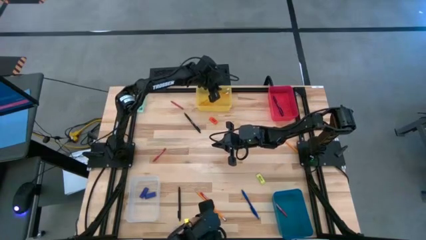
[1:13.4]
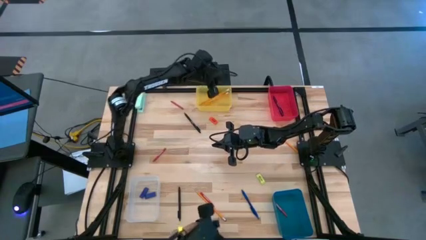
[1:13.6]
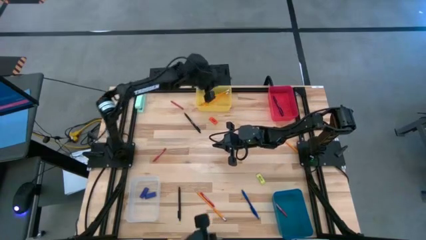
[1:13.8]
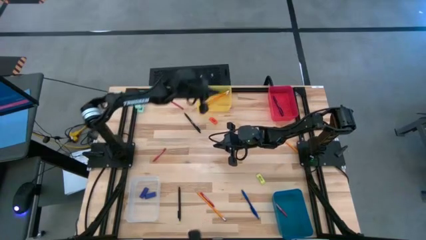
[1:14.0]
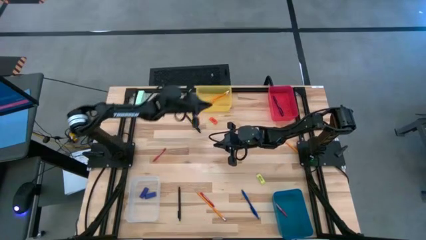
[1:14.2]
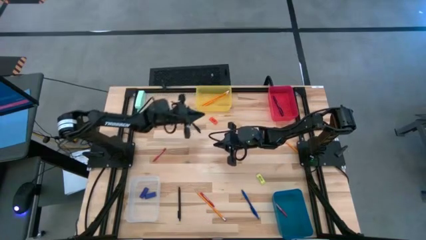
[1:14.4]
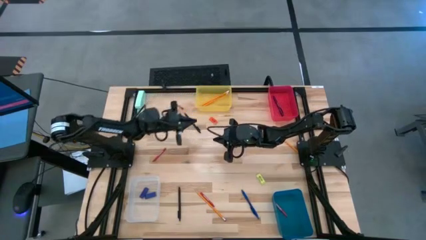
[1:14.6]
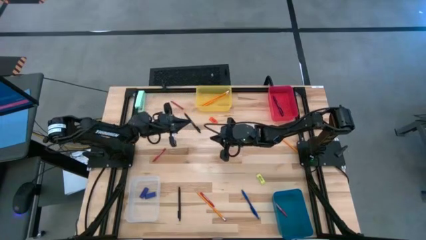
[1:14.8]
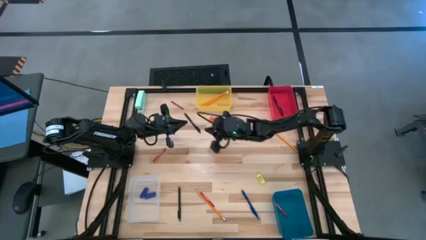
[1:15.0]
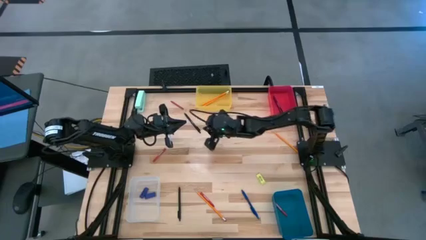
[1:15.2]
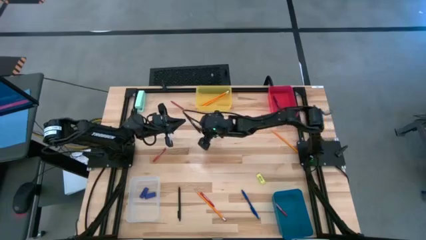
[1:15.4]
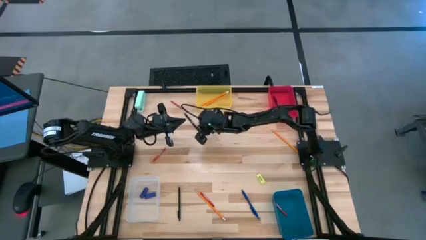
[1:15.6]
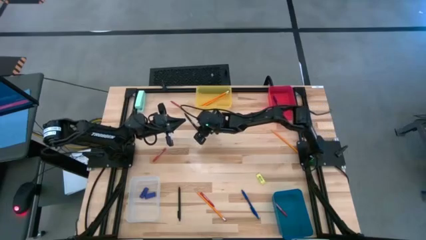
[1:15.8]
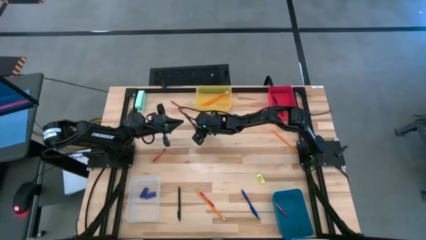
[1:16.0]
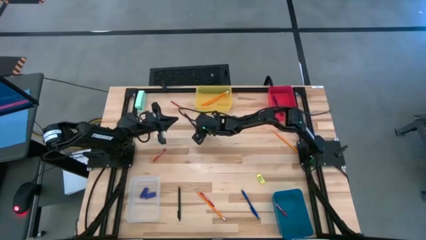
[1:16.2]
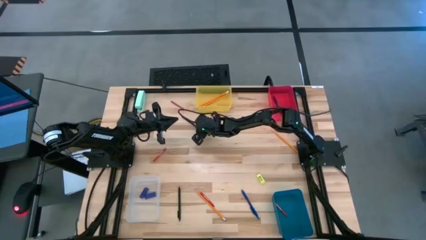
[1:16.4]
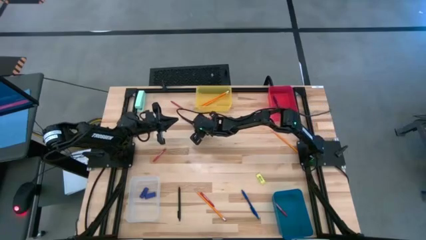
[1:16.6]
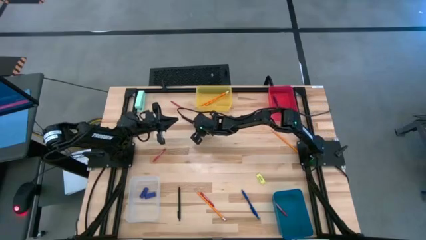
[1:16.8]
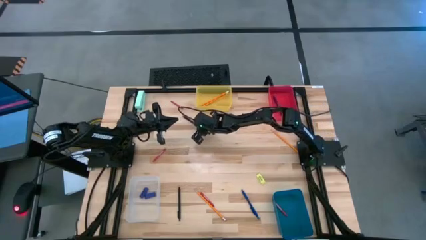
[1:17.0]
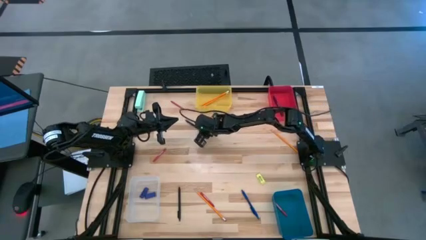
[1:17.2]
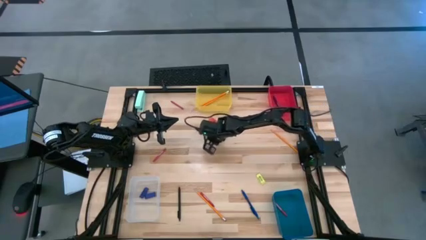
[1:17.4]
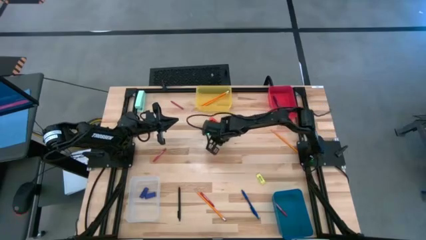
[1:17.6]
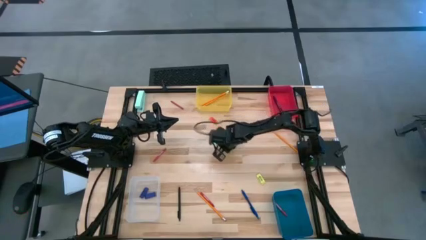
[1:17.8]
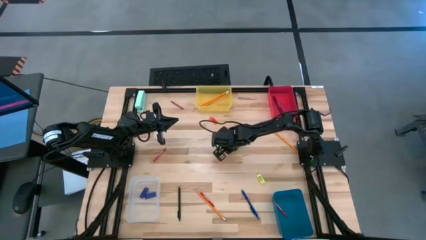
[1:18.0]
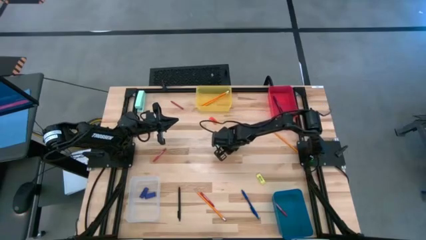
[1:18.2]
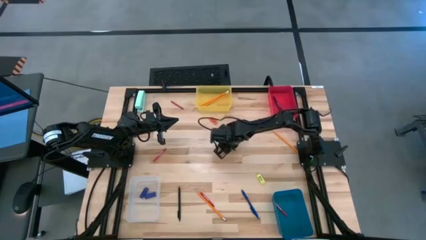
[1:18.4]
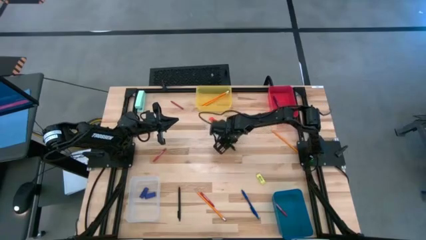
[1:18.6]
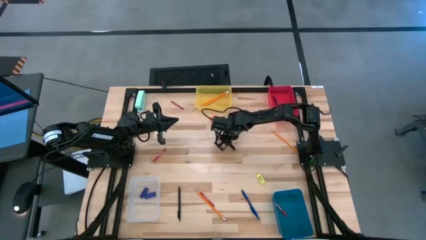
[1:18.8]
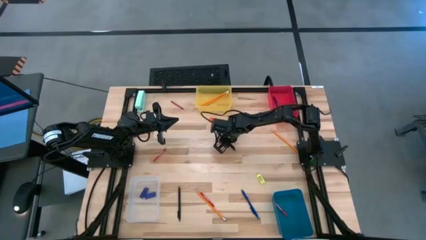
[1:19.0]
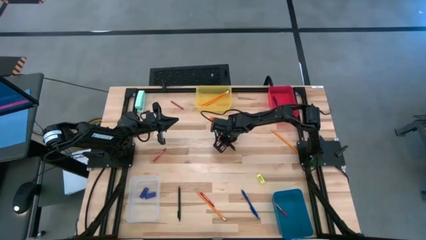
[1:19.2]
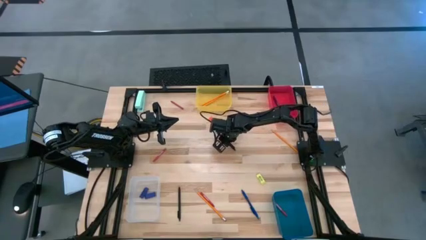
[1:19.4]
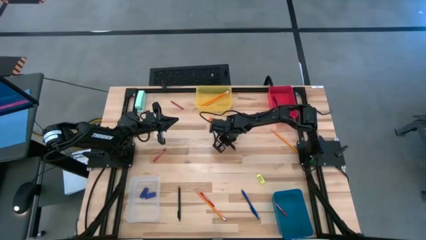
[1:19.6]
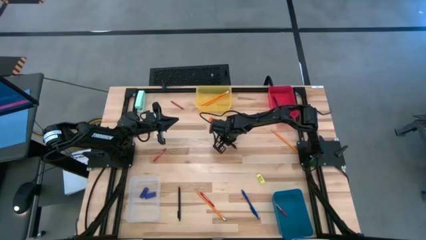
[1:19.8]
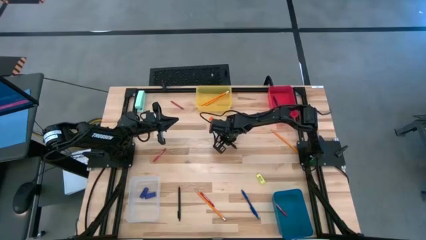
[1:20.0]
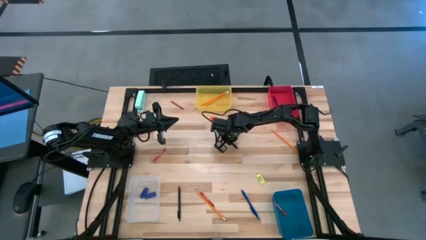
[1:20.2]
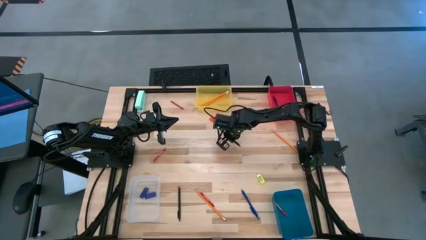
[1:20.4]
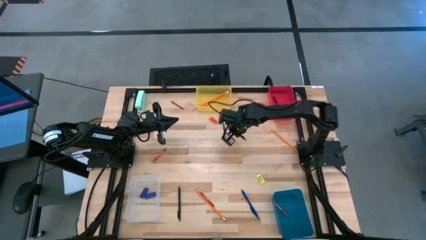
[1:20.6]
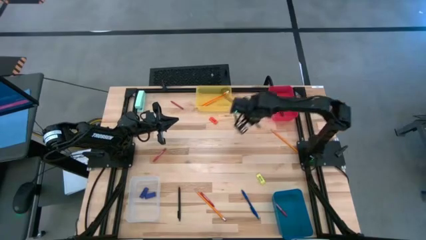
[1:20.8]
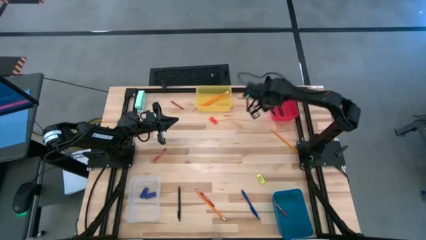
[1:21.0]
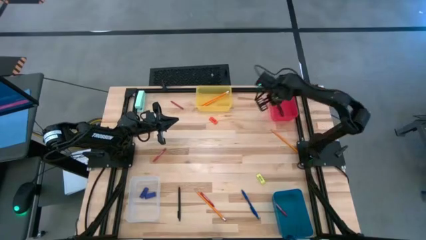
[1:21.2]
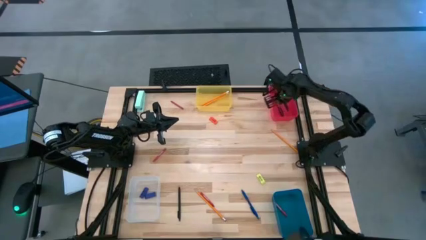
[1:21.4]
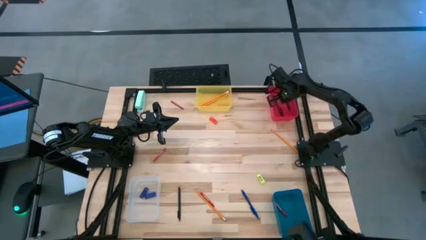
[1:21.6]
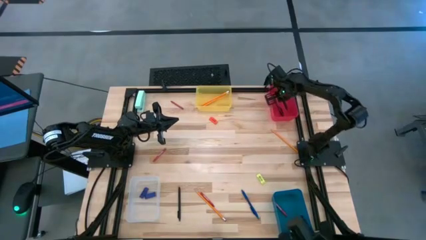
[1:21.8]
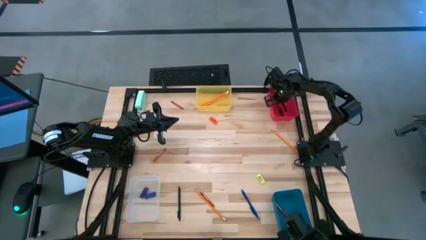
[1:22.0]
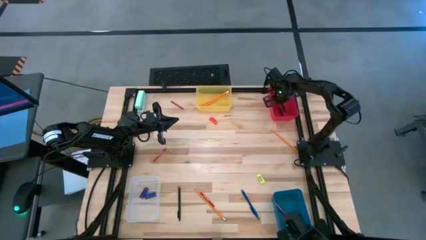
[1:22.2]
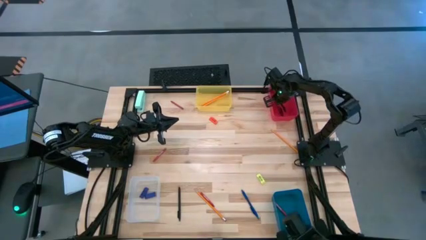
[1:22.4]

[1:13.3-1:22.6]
Task: Sort crayons/erasers/pens/pencils in bins
Put the black pen into the red bin

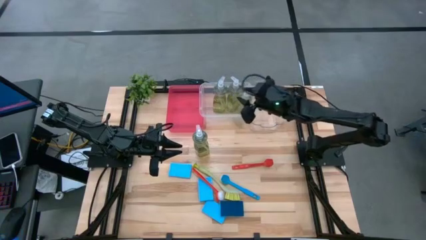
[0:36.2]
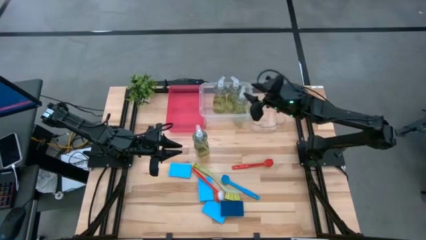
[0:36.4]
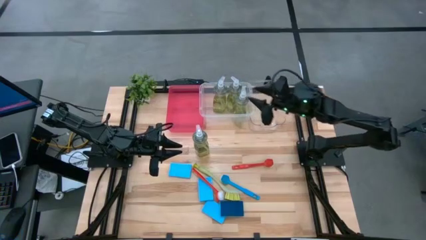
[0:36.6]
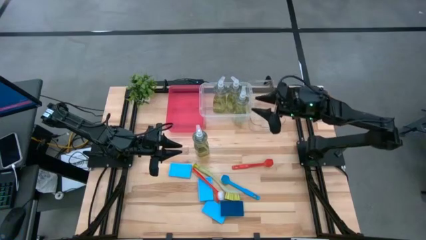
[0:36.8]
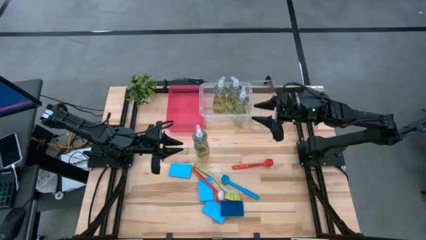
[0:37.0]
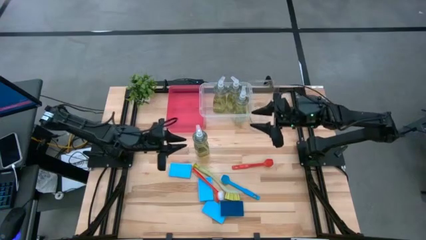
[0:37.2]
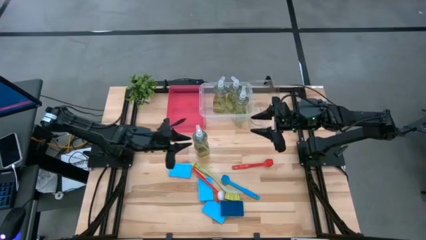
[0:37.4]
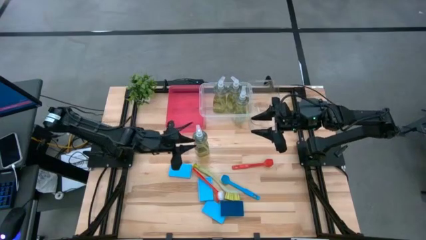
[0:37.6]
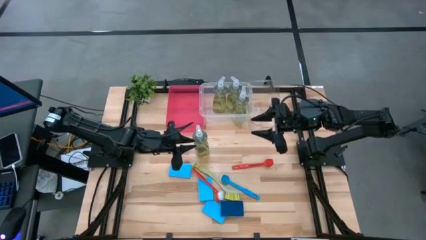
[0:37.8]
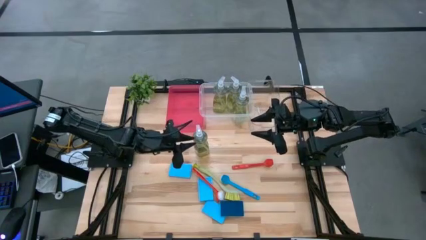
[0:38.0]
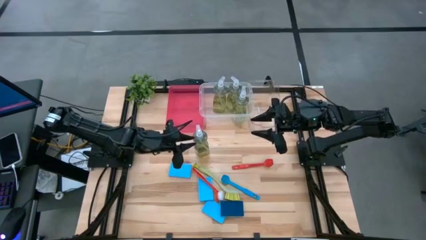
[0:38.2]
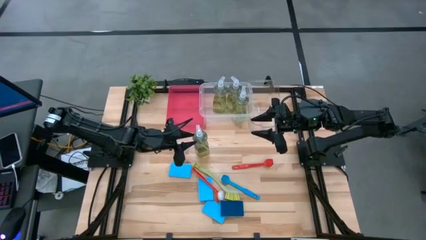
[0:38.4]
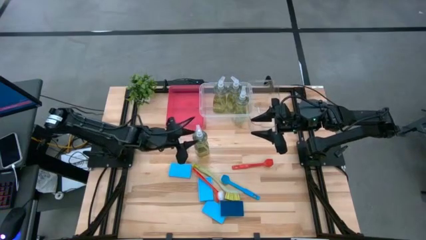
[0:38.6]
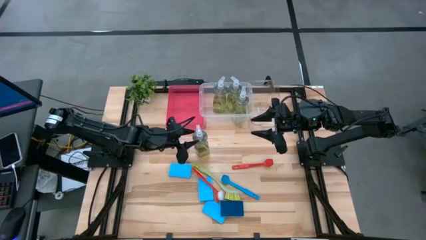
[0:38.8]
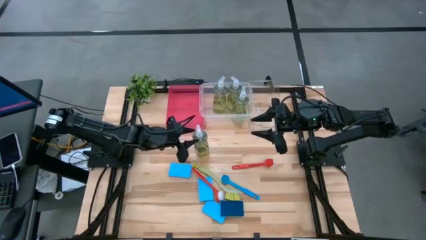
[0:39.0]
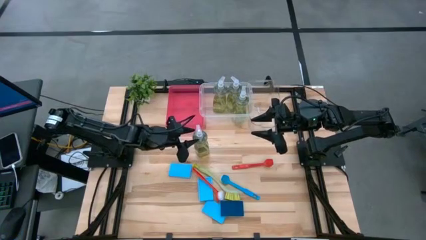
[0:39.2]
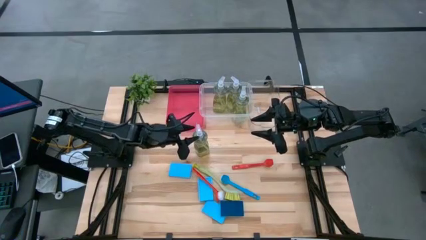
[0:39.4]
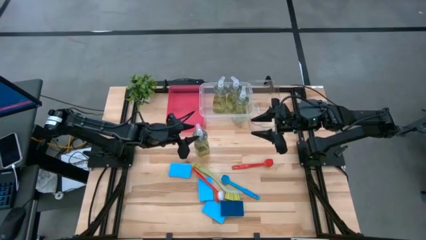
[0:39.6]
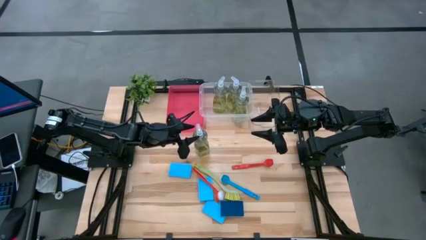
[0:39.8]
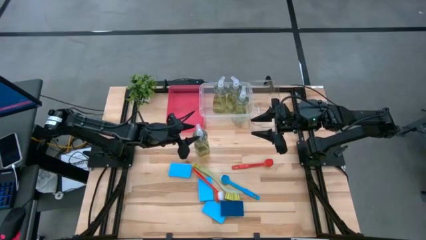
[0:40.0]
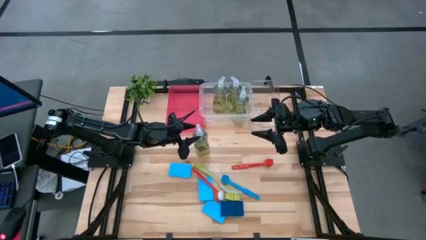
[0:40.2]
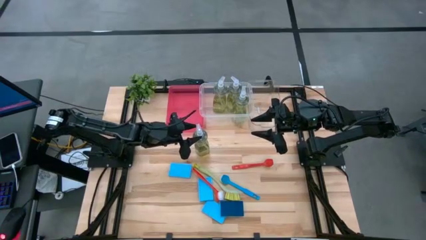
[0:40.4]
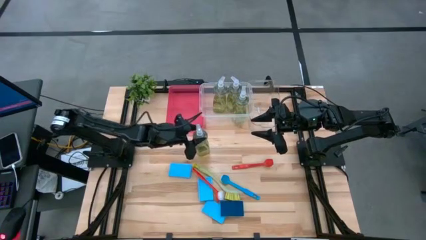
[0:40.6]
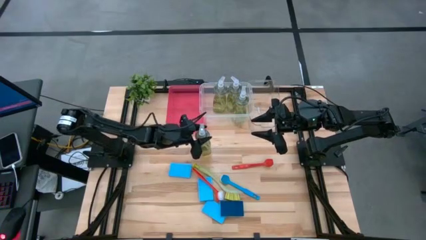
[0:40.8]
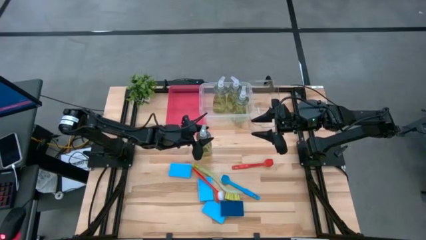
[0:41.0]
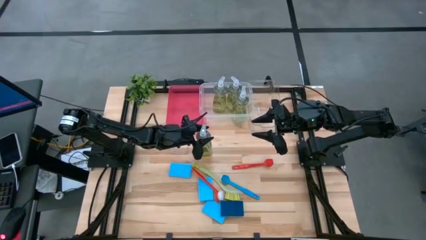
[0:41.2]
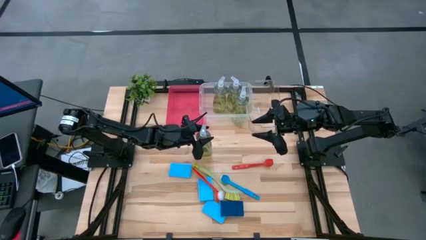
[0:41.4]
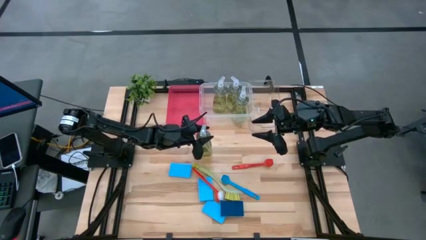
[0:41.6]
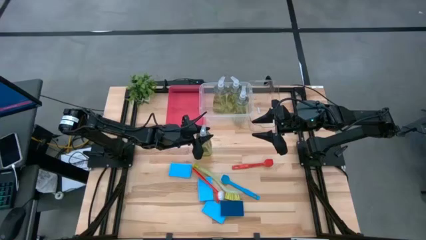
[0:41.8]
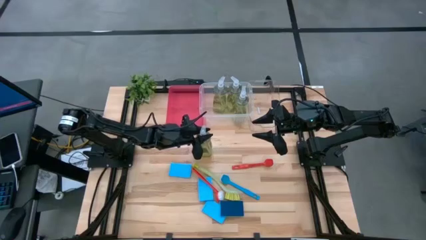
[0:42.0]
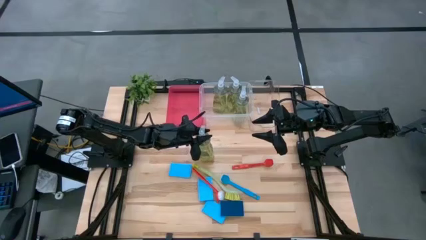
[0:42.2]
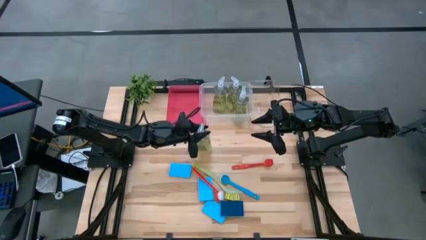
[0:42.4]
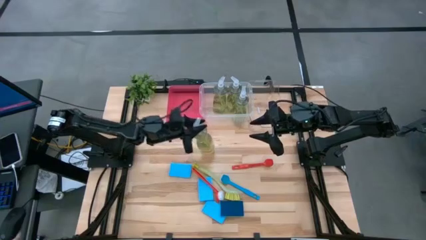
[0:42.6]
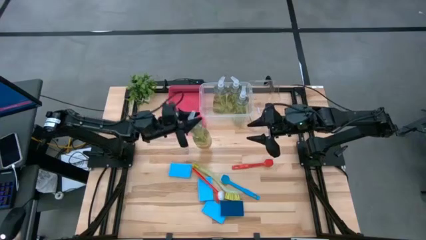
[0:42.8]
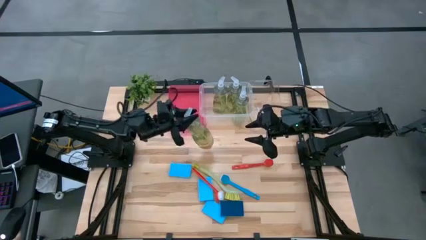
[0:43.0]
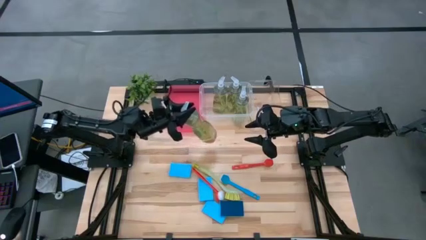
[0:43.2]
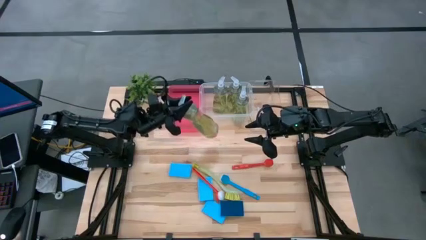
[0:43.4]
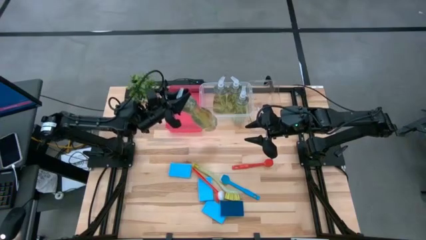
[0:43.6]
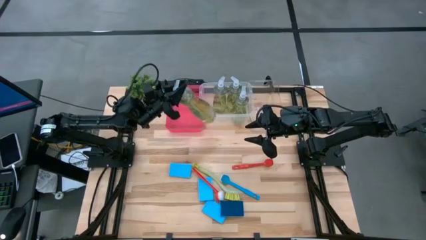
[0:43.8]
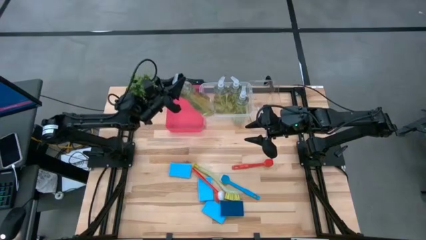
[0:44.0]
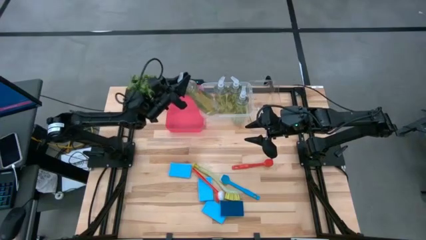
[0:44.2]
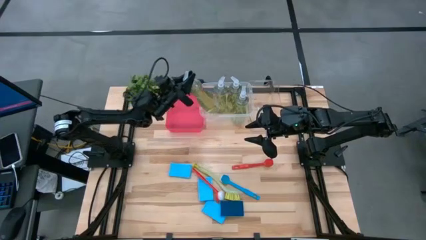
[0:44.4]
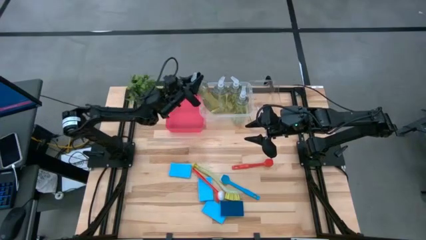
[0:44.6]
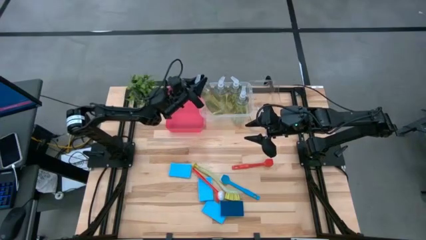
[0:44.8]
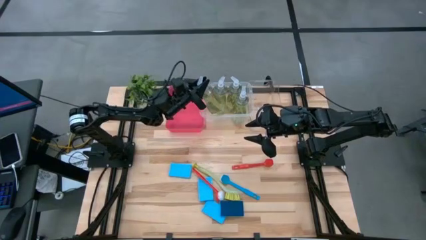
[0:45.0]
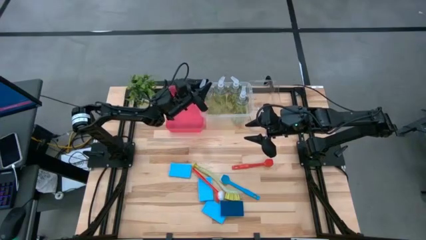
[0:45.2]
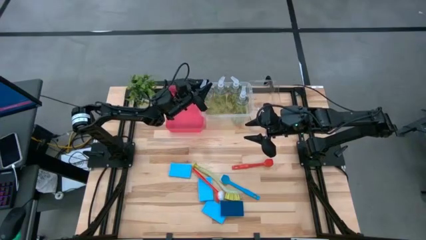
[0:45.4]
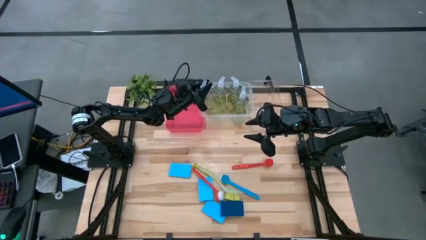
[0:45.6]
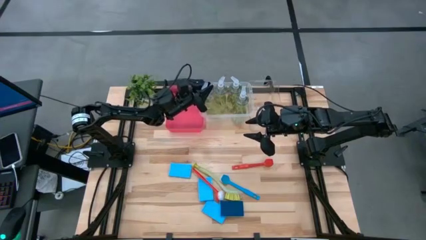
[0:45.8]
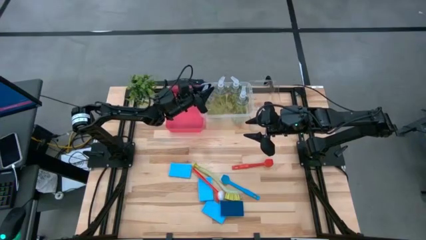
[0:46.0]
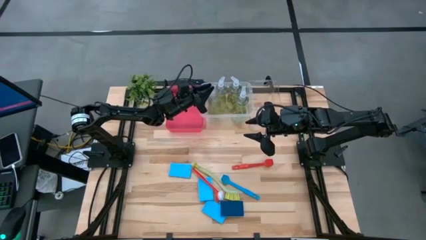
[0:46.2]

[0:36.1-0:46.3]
Task: Pick & Place Kitchen Sink Supplies
Put the green dishwashing liquid into the white bin
